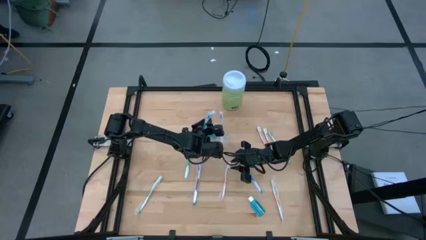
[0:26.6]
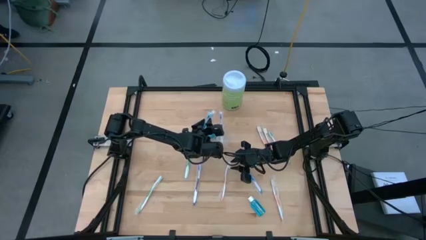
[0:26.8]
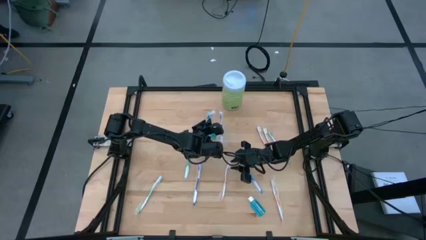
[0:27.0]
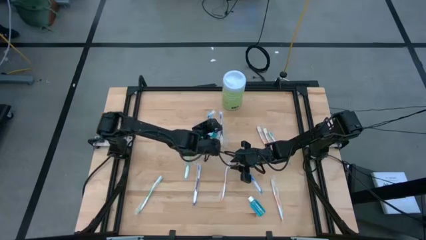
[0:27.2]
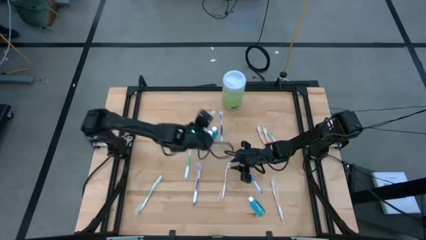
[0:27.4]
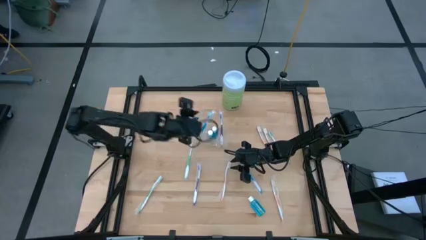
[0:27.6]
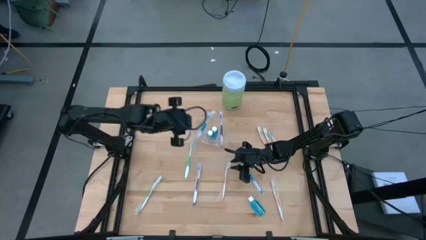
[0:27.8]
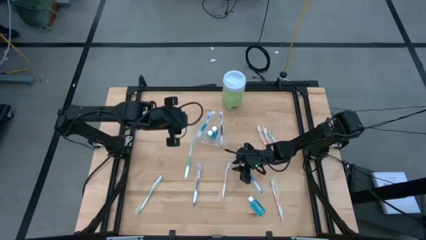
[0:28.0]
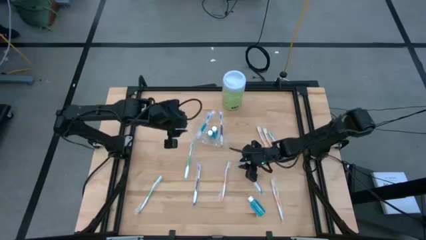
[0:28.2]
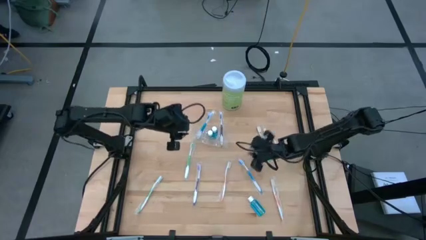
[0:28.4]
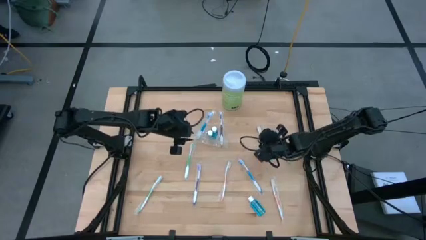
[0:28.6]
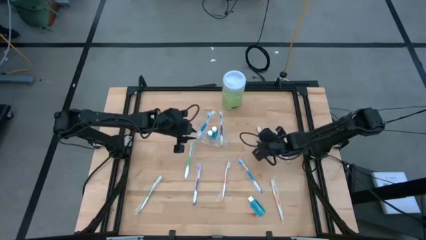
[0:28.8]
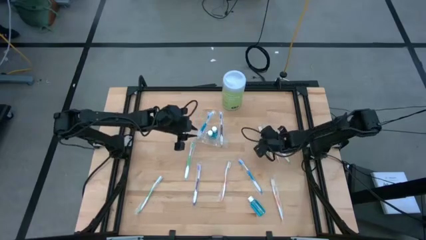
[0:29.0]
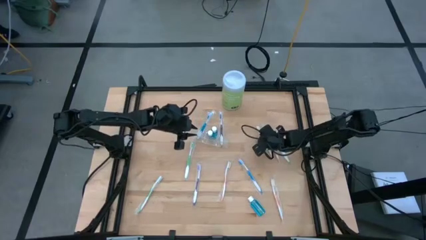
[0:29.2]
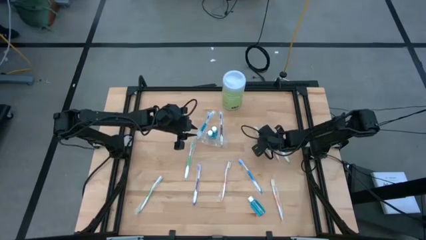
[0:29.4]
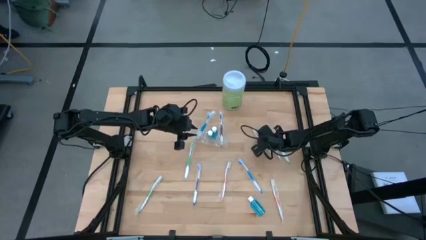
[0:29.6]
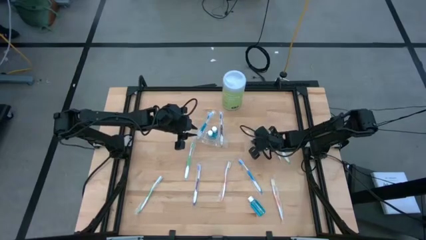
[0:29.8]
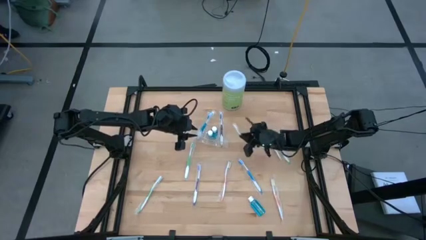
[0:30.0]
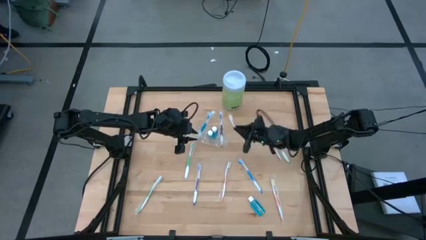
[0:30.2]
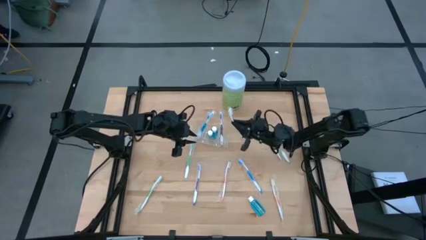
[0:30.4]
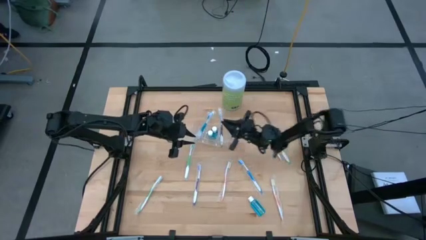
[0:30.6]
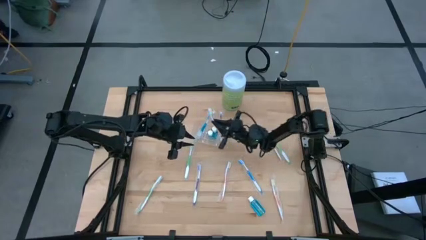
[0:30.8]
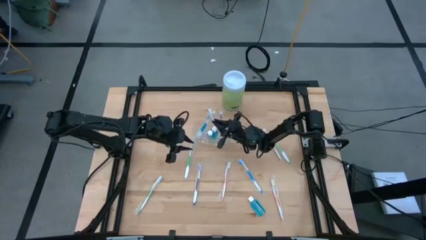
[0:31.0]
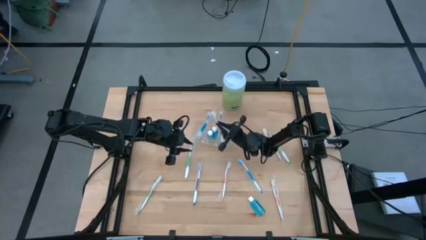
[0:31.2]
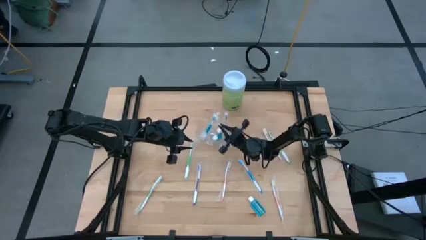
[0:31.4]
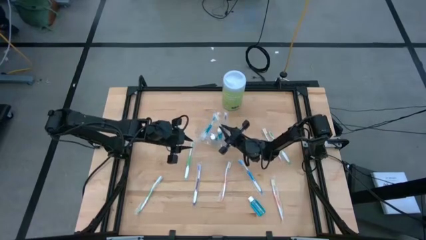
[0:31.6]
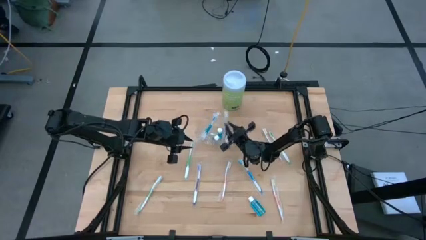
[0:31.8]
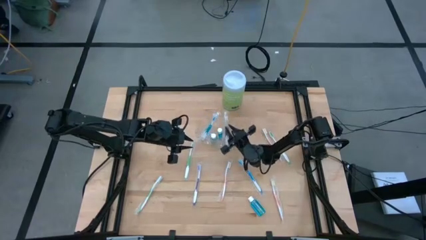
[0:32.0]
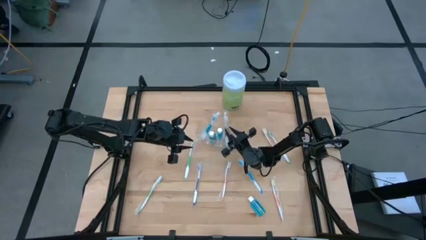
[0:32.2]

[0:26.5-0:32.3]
Task: Pick & Place toothbrushing station
Put the orange toothbrush into the transparent organizer

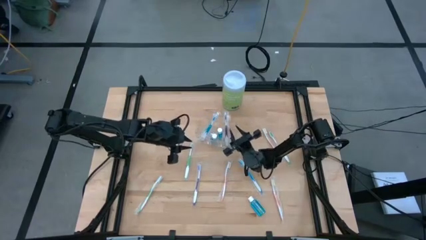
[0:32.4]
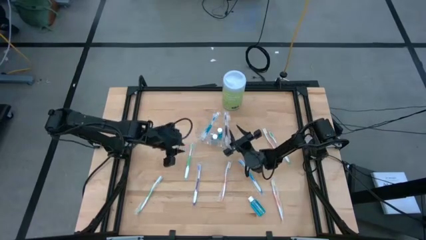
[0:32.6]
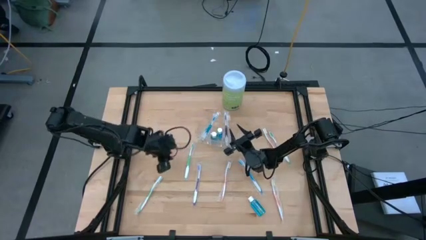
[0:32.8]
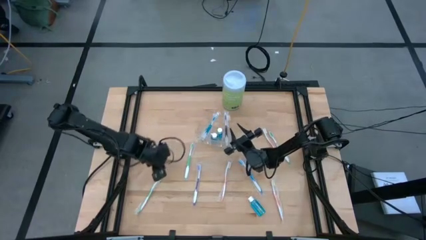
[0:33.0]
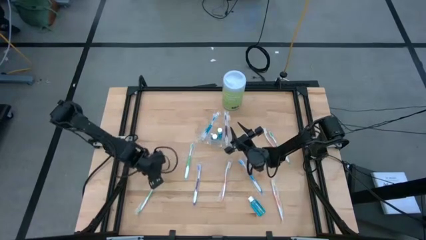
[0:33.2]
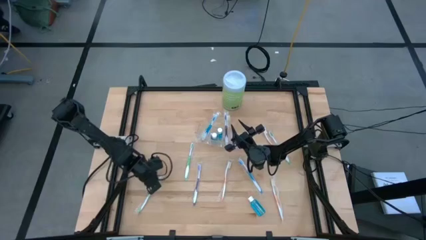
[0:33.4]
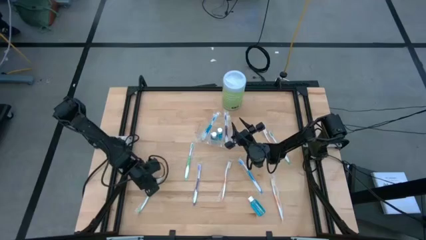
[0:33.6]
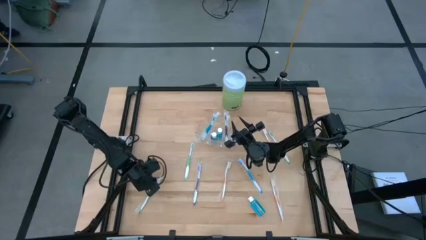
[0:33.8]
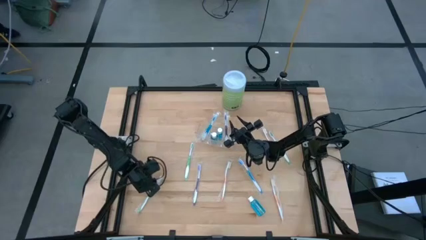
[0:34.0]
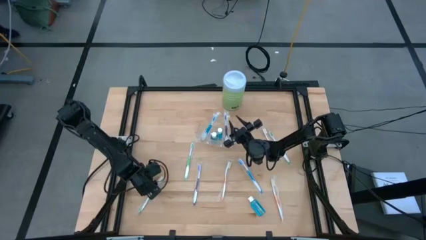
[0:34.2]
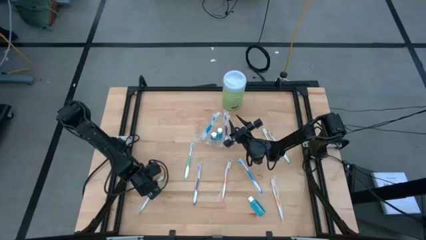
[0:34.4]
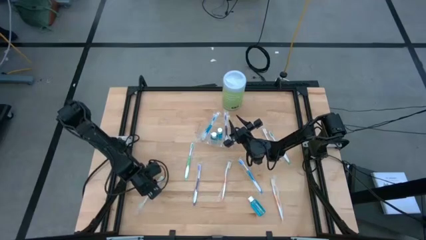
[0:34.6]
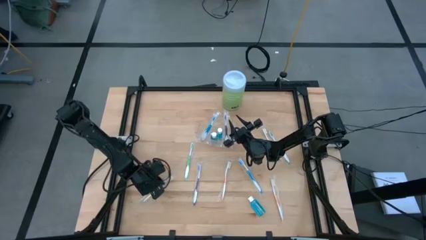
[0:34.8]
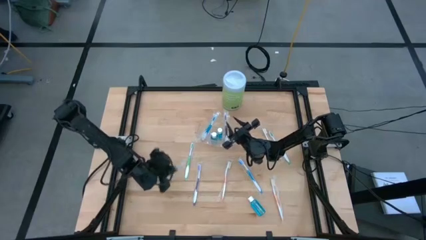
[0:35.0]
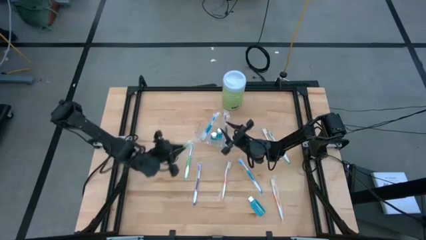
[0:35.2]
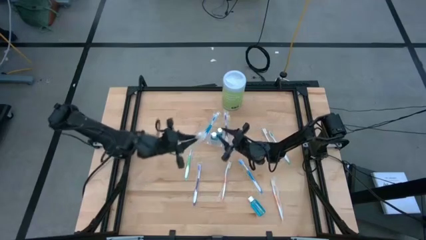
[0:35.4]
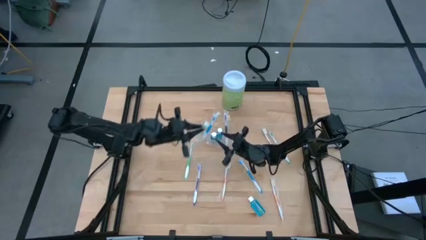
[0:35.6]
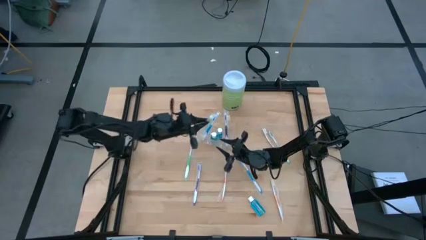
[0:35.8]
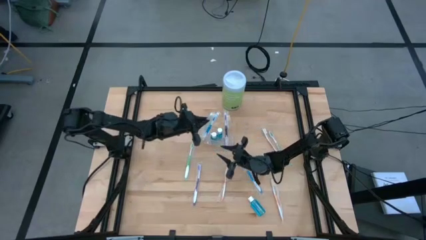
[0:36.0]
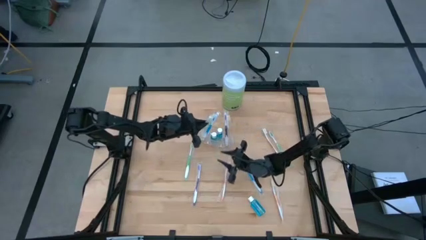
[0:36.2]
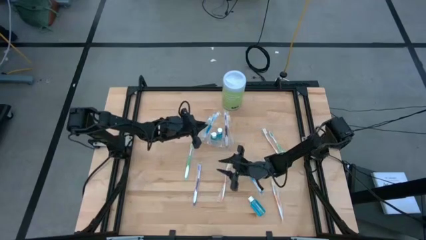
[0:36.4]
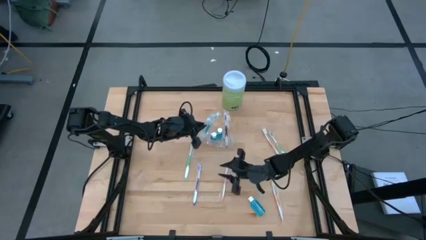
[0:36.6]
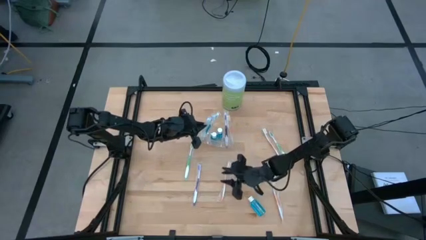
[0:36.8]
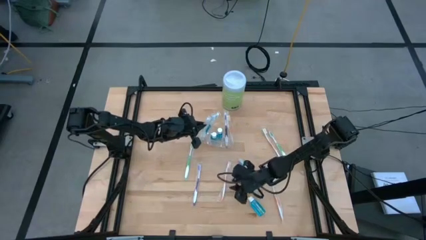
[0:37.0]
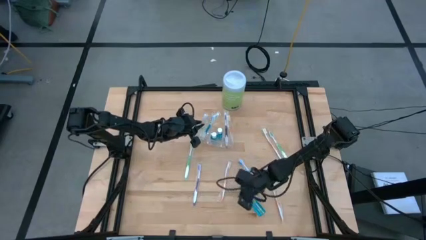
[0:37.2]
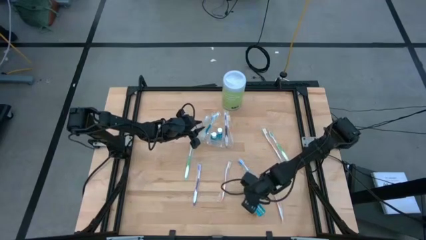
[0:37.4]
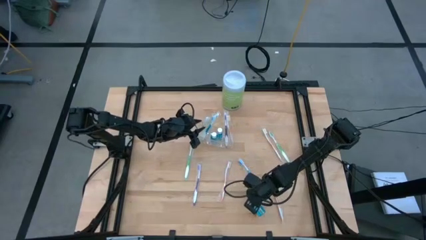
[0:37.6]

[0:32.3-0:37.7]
Put the green toothbrush into the transparent organizer

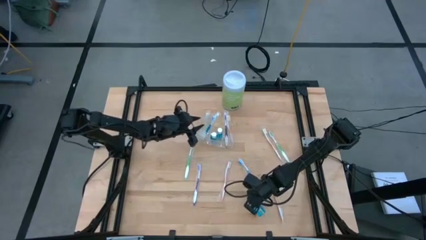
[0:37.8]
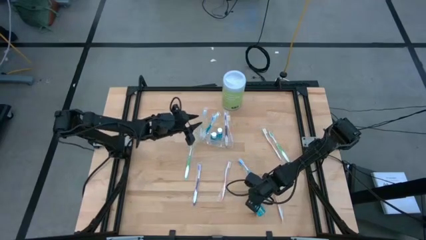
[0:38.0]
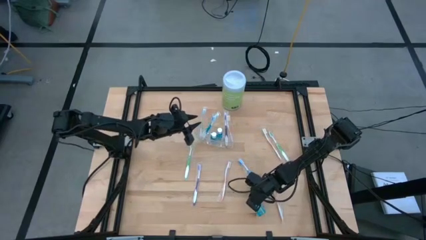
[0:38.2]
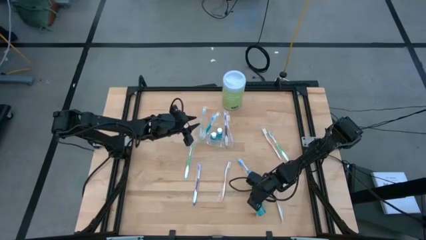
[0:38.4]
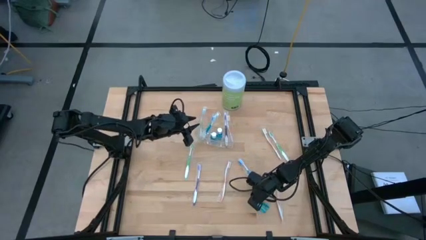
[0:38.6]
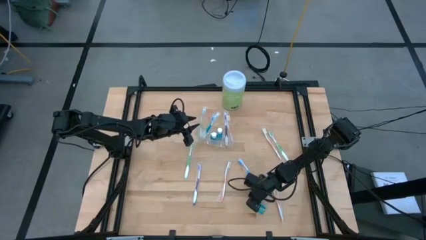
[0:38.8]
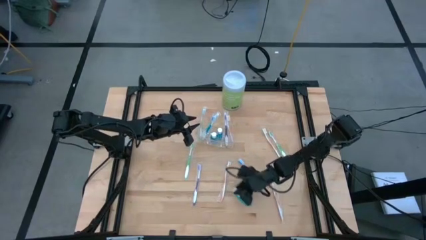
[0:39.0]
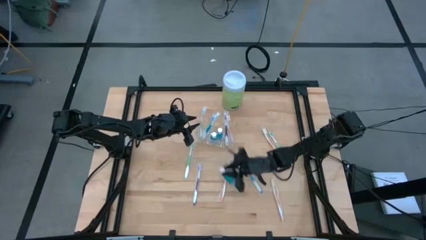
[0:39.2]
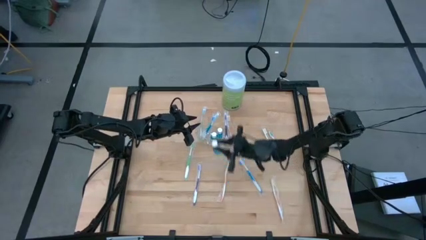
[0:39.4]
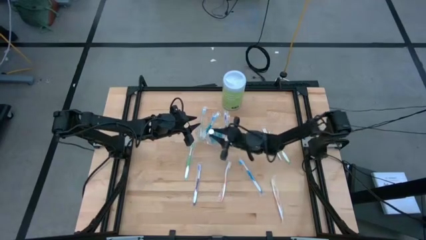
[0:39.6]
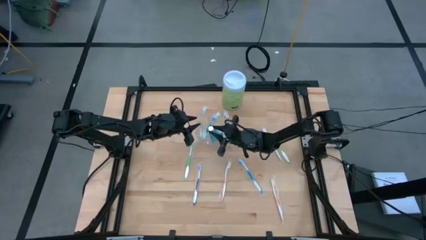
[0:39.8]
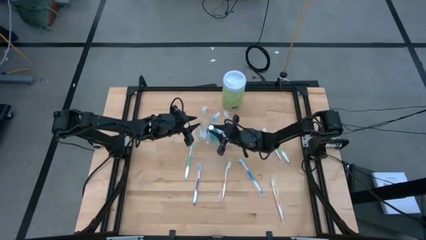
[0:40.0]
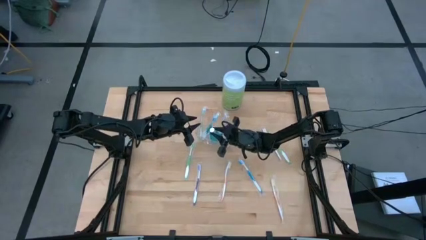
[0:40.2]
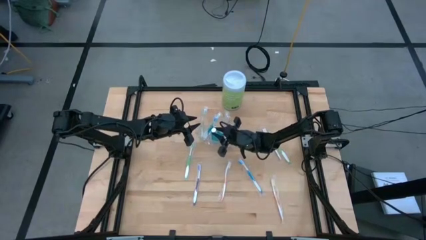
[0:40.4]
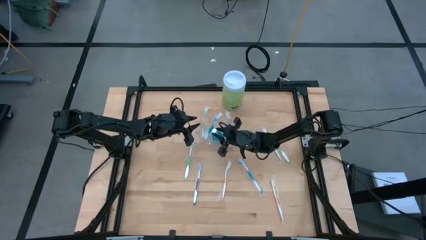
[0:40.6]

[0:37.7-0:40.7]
Put the blue mouthwash into the transparent organizer

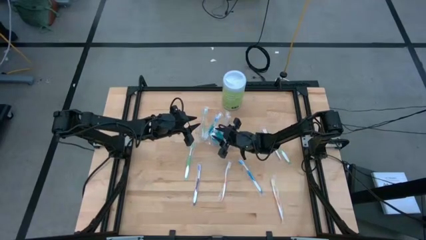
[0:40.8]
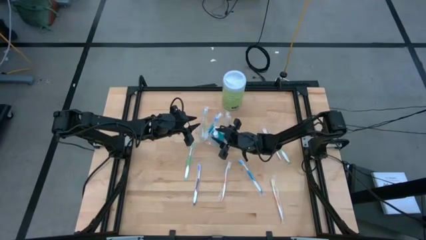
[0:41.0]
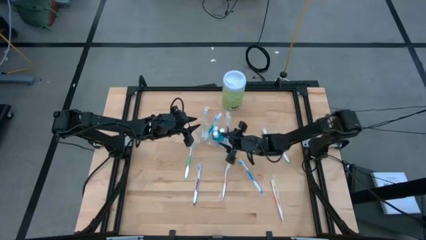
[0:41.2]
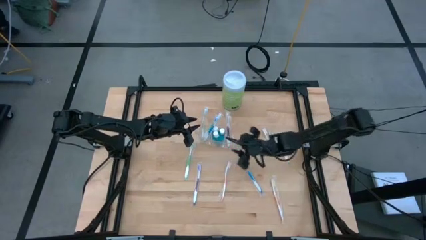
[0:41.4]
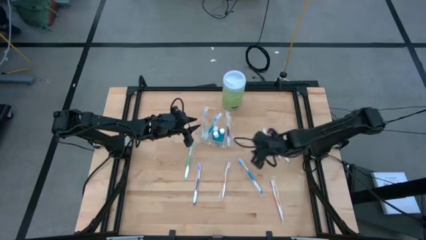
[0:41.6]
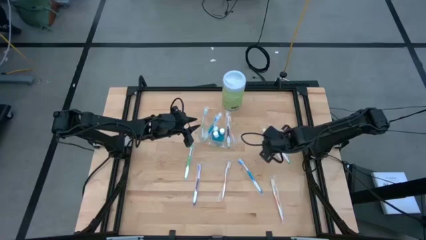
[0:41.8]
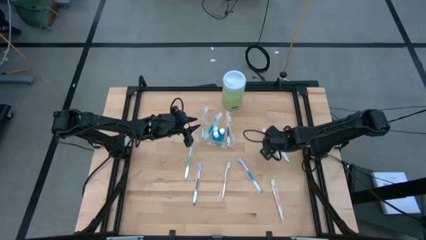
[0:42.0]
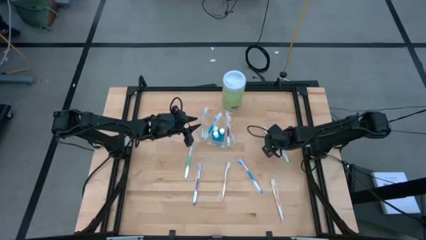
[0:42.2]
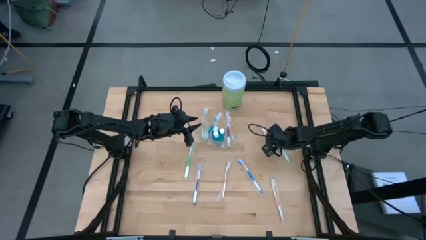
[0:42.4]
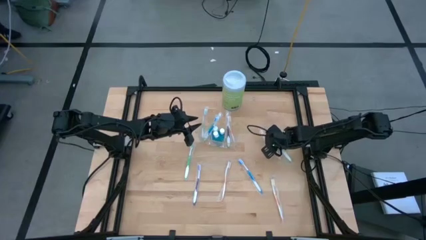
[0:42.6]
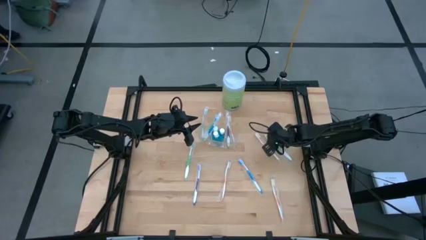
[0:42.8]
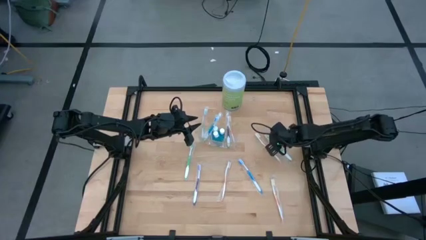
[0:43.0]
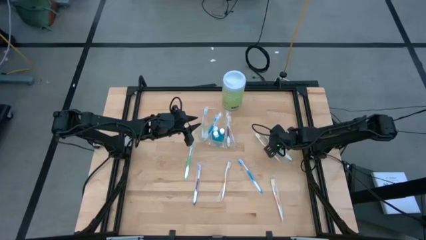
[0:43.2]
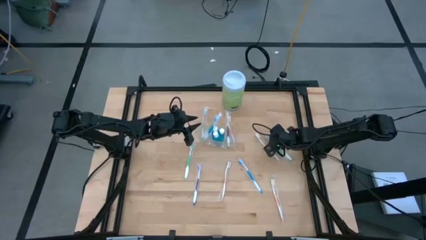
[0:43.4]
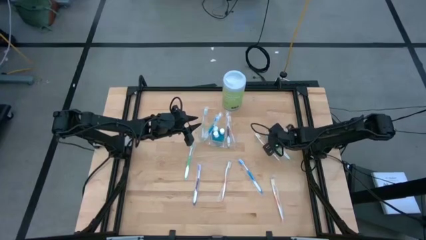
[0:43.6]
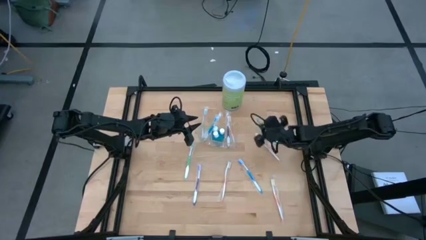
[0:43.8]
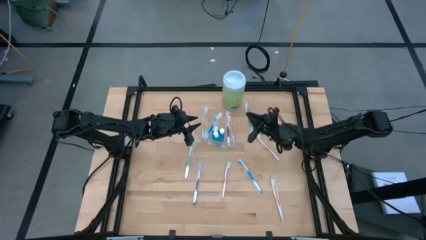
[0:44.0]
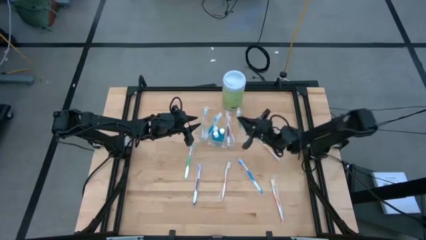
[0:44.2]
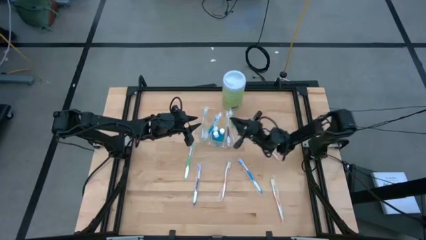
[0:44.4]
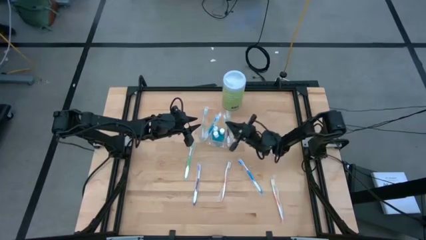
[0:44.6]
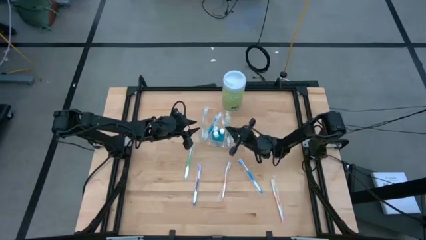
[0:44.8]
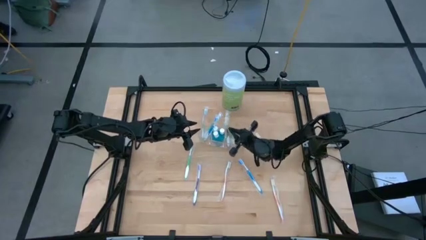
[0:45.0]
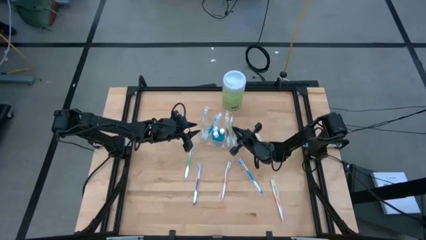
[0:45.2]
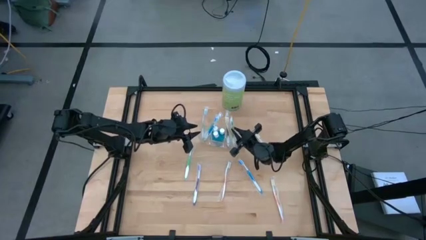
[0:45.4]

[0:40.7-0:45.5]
Put the green toothbrush into the transparent organizer
